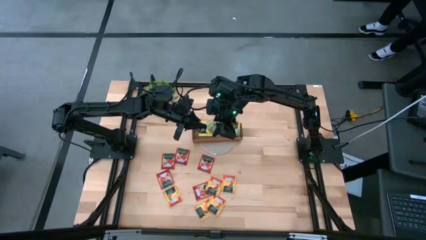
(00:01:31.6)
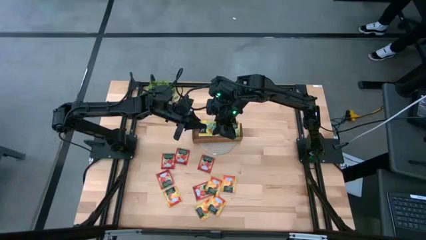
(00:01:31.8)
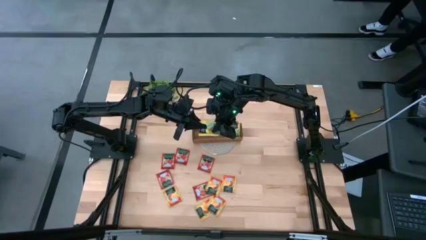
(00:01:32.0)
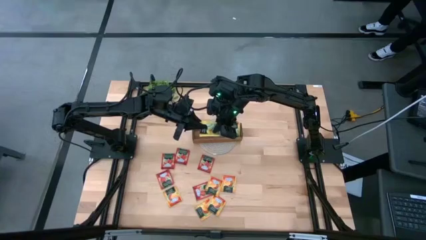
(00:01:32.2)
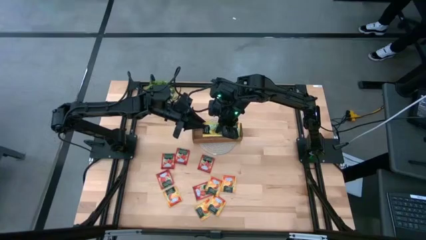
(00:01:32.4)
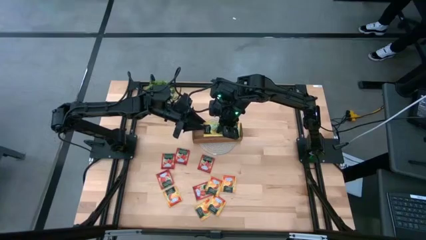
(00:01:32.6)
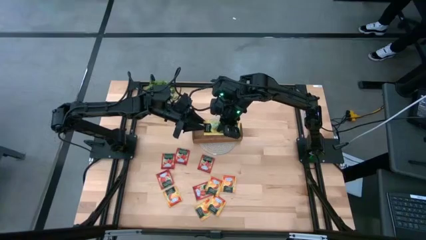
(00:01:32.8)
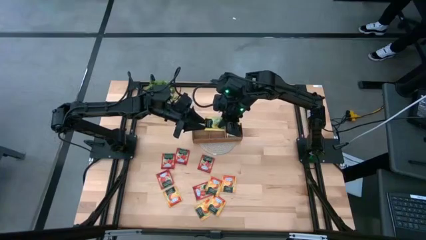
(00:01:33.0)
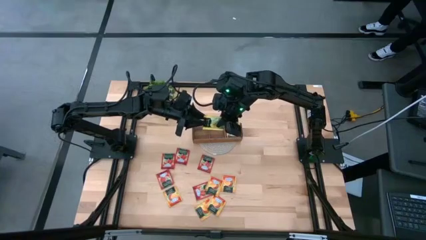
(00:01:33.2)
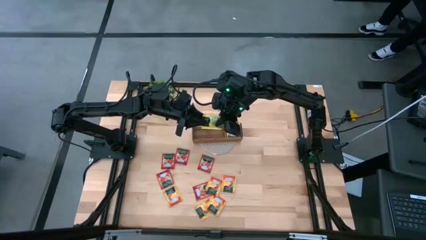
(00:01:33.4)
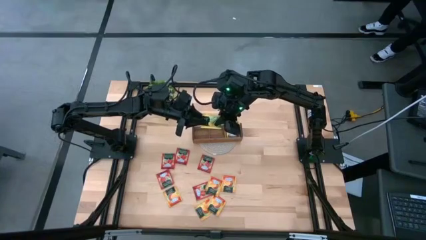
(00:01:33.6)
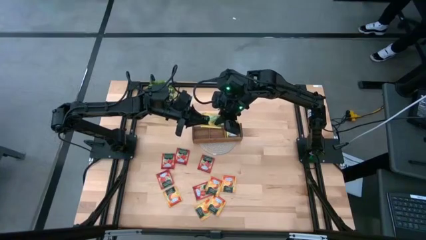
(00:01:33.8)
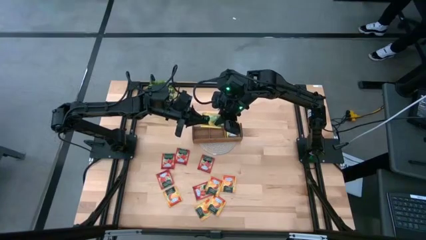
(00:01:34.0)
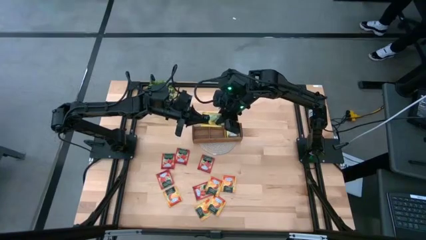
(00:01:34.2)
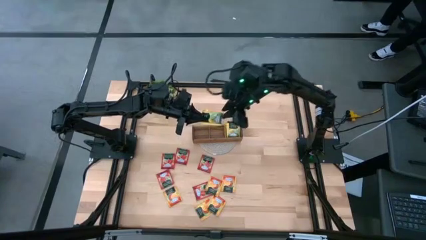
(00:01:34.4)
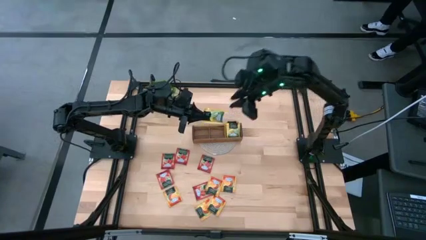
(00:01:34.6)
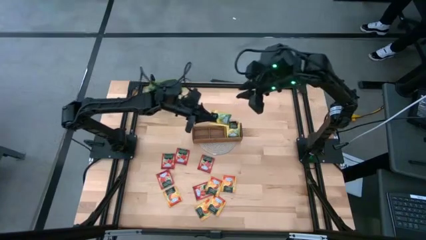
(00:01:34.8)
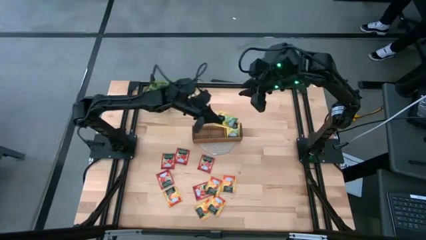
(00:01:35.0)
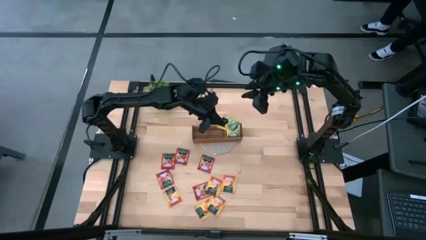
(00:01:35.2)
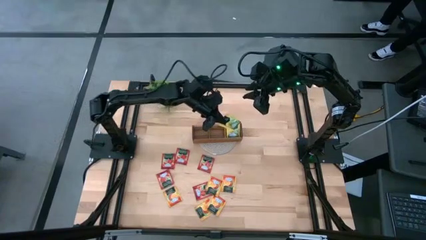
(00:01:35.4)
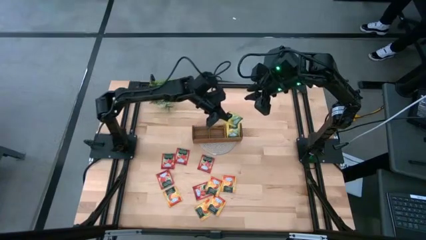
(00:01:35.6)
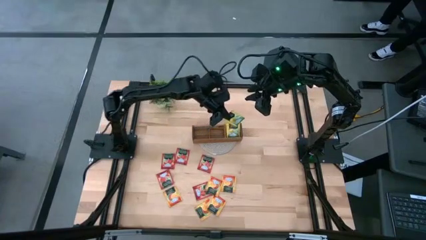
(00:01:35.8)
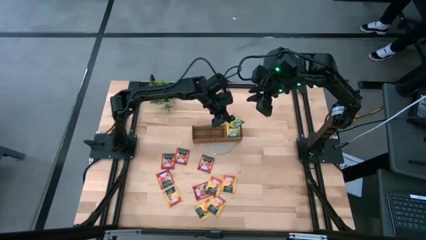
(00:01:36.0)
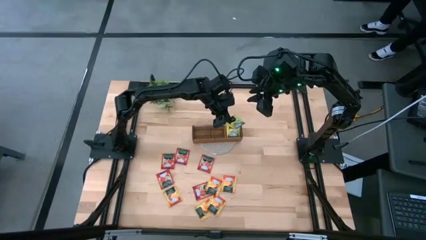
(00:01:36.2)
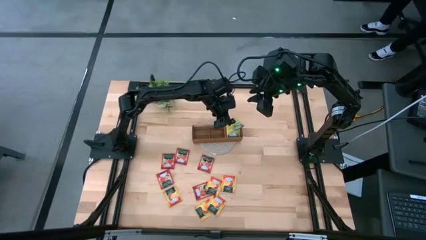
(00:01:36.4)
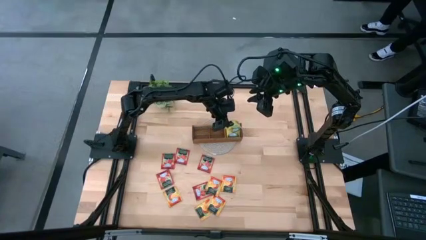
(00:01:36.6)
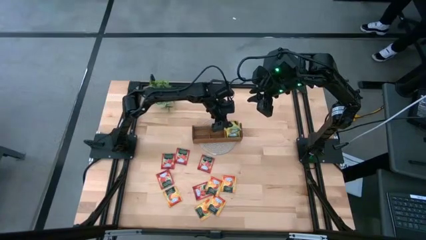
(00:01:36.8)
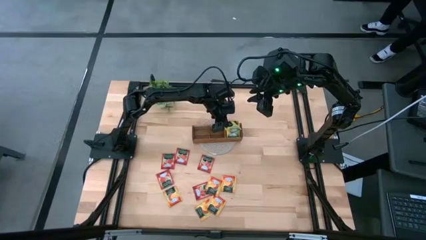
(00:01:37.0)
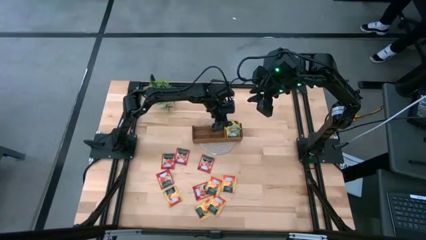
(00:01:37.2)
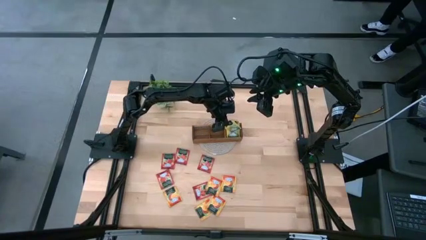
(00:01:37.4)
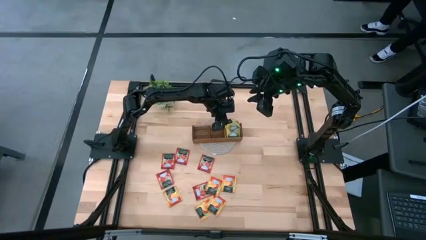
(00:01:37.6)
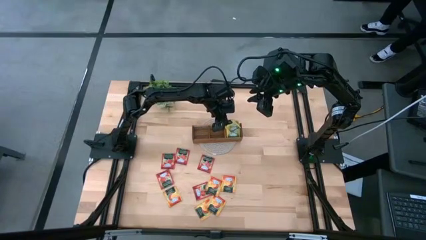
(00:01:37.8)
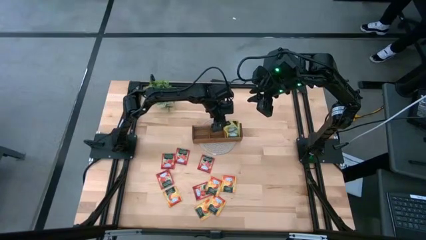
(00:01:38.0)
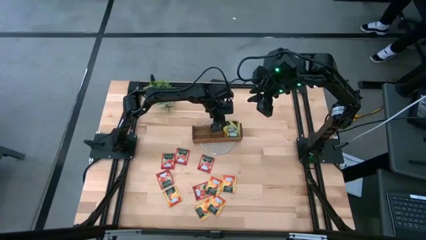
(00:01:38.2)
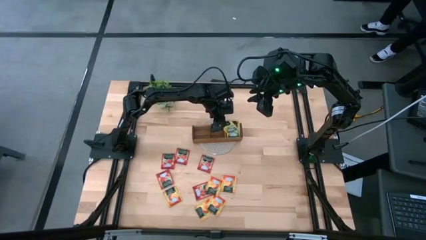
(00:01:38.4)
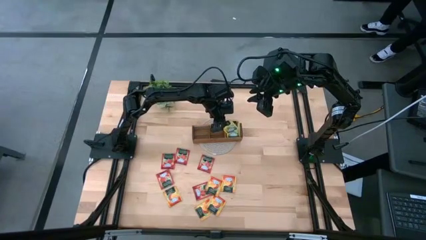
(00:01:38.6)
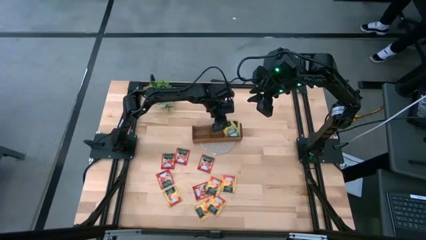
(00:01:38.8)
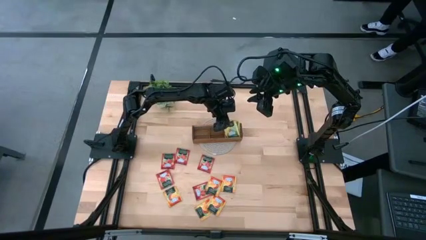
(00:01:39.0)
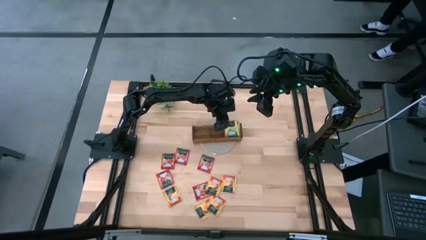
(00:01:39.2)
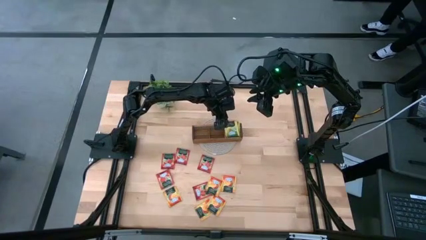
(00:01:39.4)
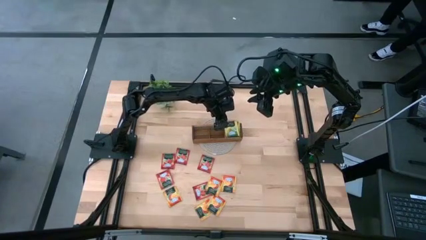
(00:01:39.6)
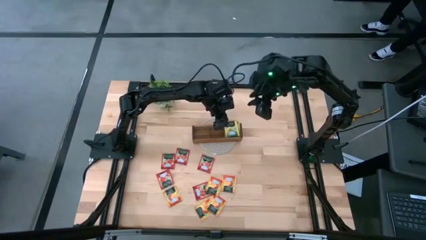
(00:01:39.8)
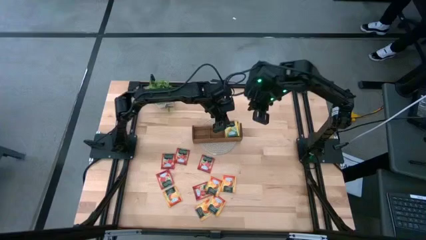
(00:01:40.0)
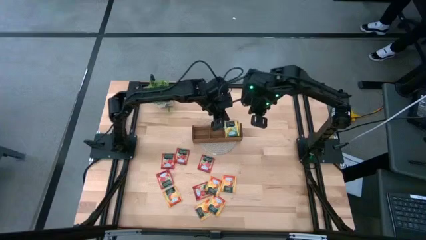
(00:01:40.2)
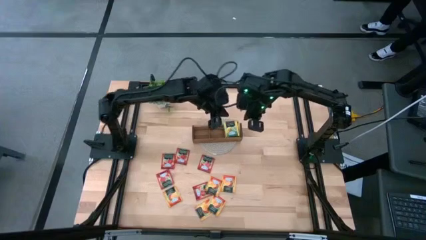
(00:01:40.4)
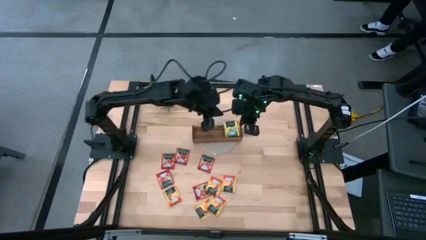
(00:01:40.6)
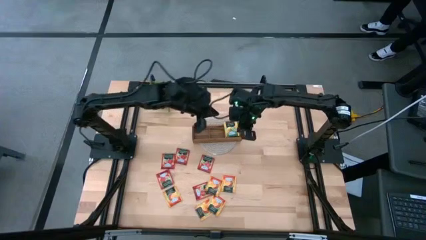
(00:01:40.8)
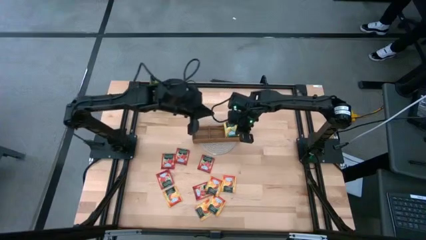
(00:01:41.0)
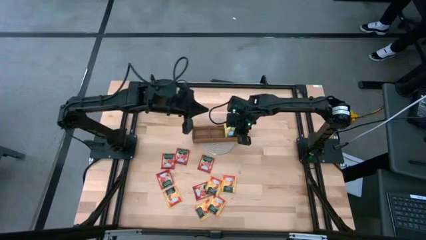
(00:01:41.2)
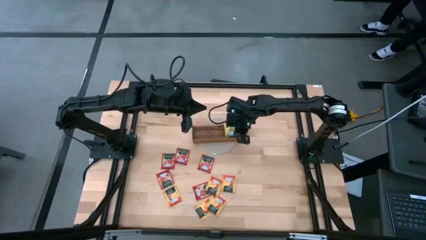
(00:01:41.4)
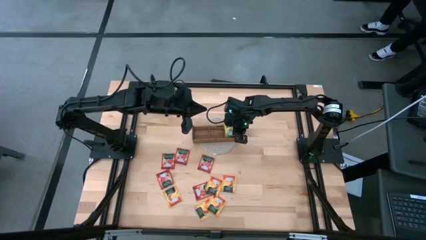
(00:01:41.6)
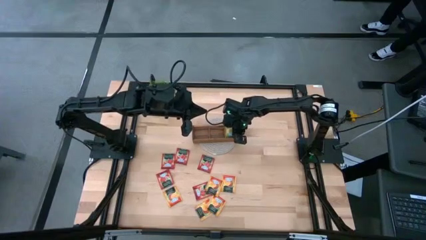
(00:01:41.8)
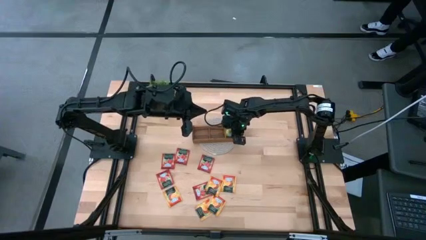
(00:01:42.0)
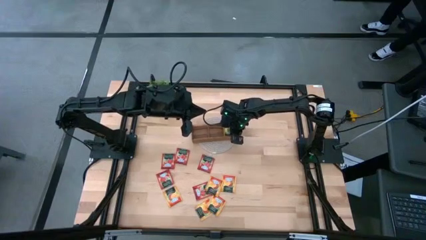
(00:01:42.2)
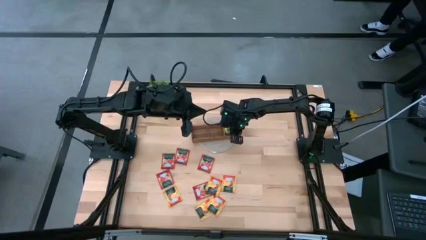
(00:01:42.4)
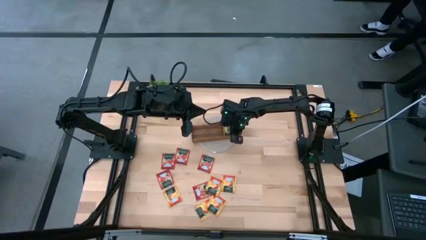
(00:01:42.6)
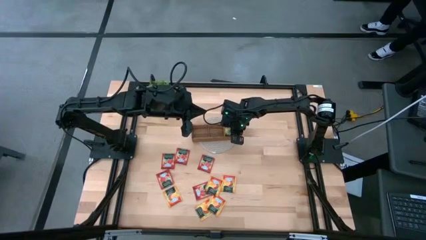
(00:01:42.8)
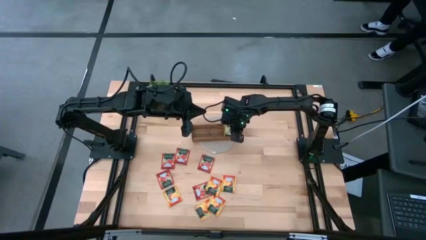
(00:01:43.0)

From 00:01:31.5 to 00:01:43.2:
Task: Pick & Place Tea
Put the yellow tea bag into the right section of the wooden organizer

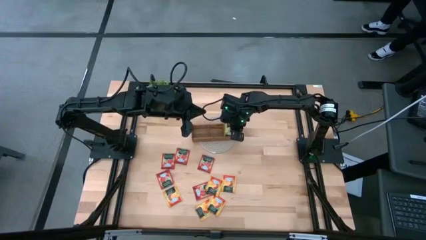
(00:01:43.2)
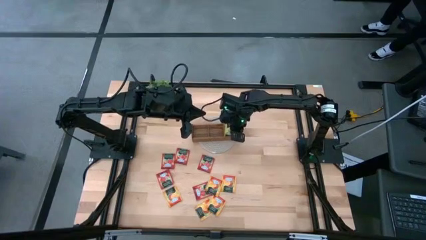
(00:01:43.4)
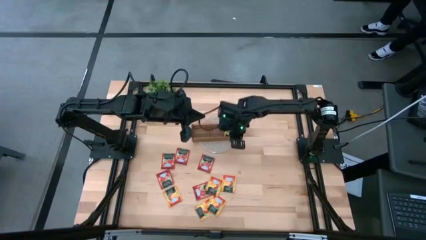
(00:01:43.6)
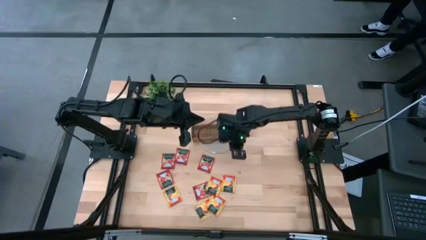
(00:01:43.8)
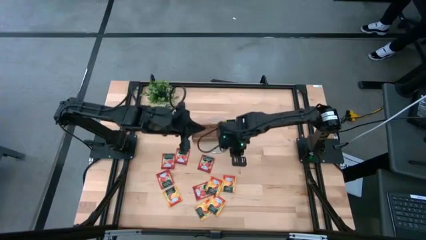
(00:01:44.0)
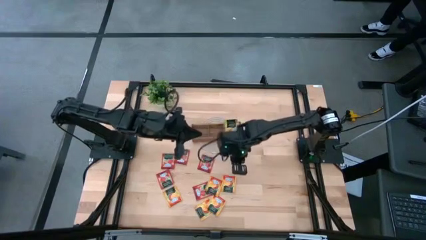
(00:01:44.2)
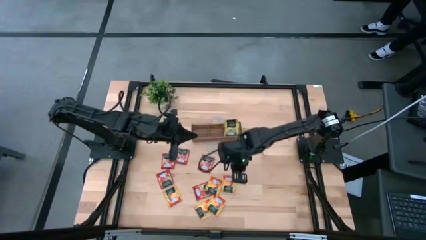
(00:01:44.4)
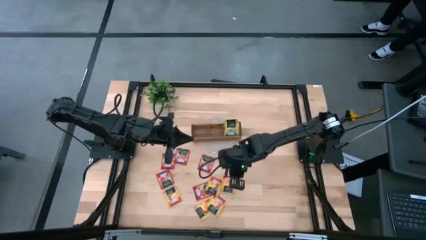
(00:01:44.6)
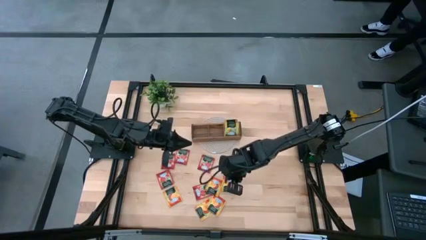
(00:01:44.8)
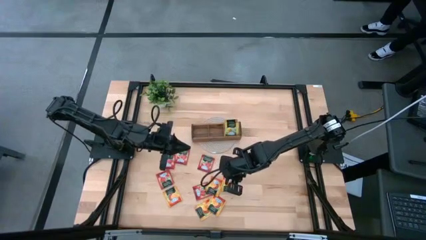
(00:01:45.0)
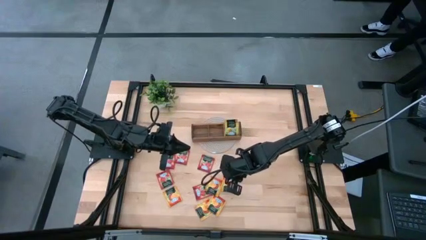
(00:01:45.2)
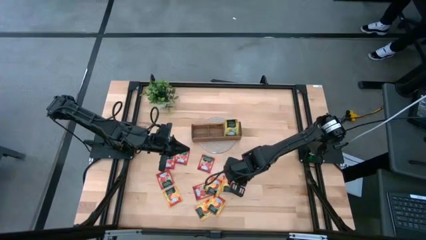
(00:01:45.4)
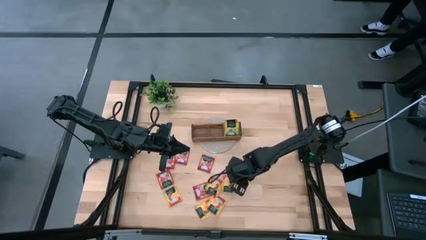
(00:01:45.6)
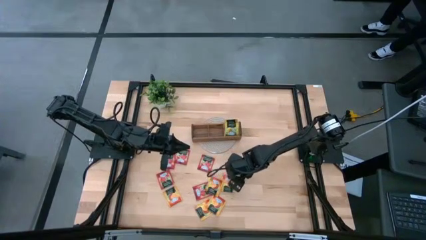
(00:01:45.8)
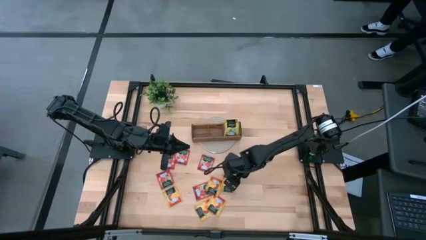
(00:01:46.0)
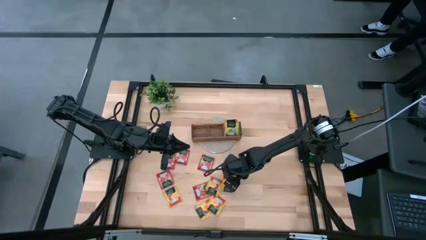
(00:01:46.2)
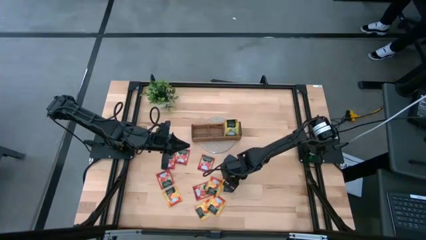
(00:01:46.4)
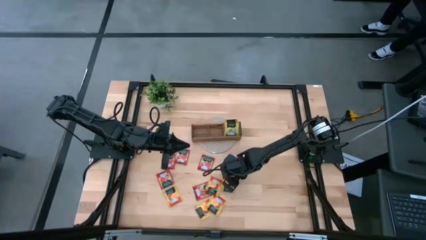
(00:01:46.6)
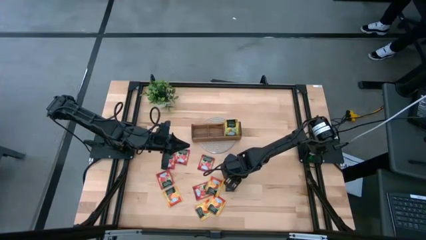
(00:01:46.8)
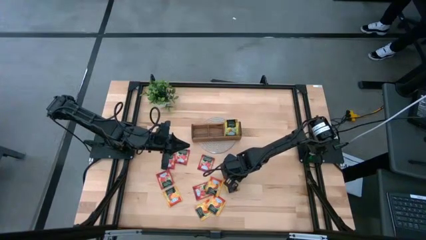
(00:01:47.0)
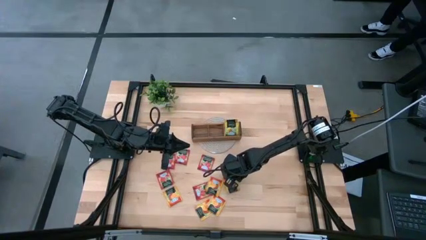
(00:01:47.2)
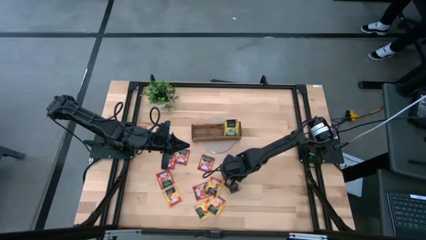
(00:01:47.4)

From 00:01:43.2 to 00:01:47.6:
Put the orange tea bag into the middle section of the wooden organizer

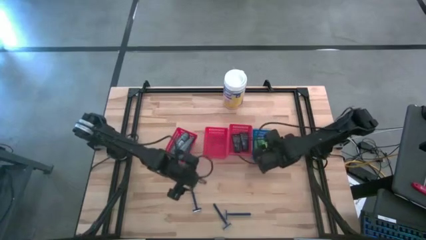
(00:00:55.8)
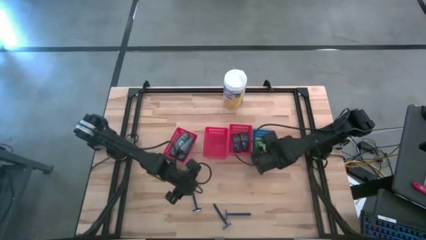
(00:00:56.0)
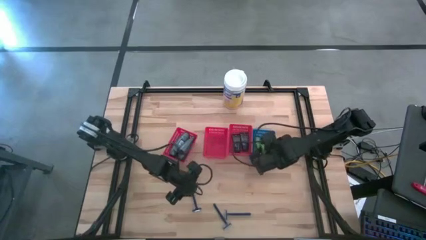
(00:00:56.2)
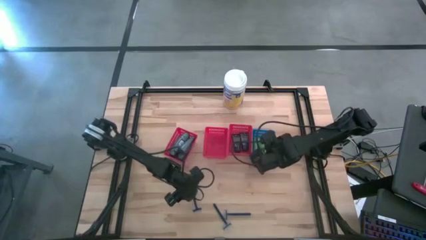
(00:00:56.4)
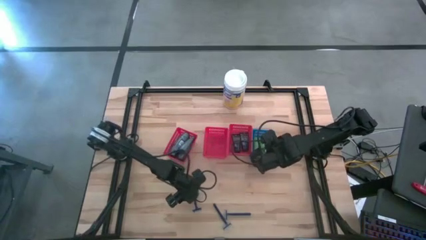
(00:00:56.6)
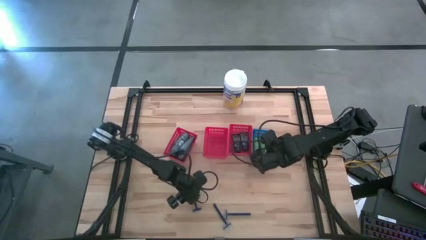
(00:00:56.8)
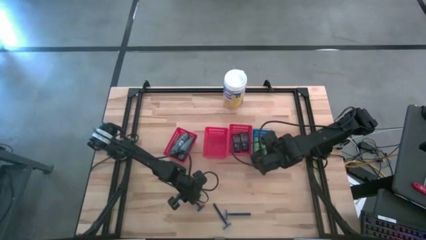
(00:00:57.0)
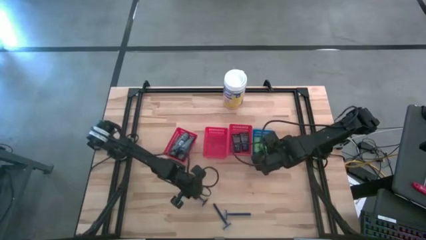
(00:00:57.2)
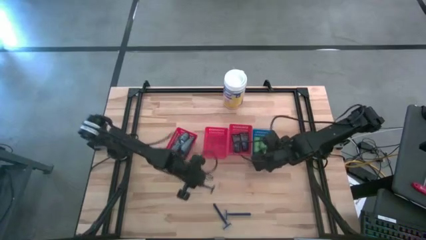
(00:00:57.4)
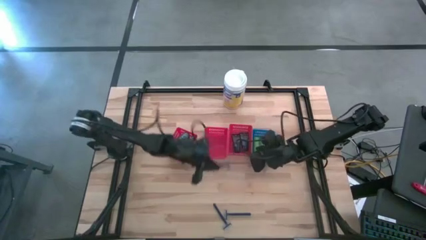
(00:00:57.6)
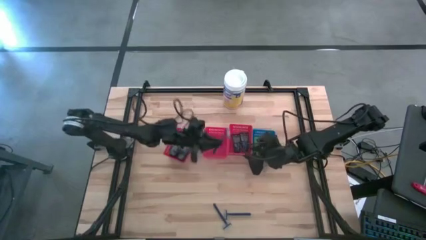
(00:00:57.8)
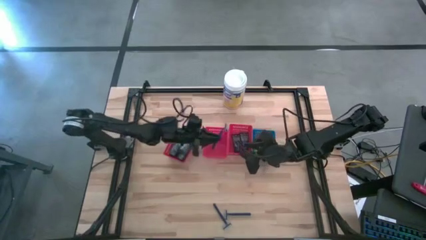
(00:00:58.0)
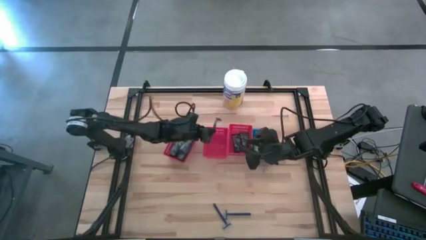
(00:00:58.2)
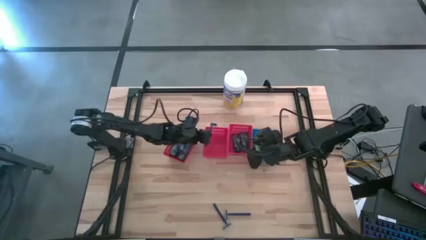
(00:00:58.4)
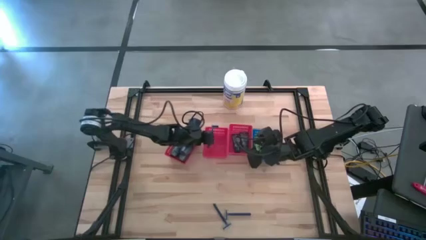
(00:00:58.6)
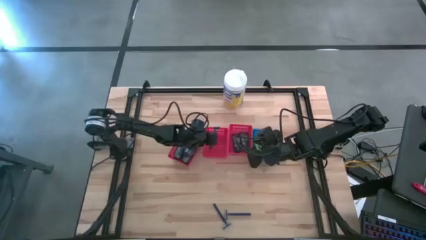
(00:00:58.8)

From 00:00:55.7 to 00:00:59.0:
Task: Pick & Place Travel size toiletries
Put the blue razor into the middle red bin
